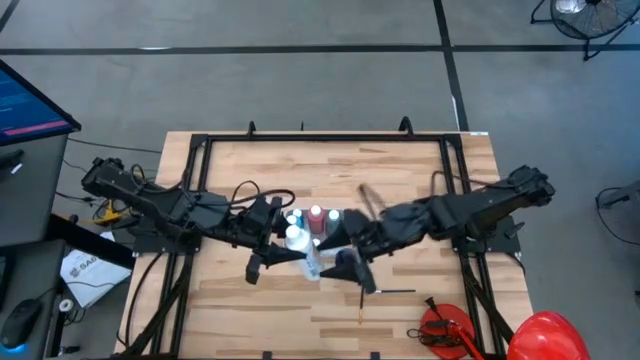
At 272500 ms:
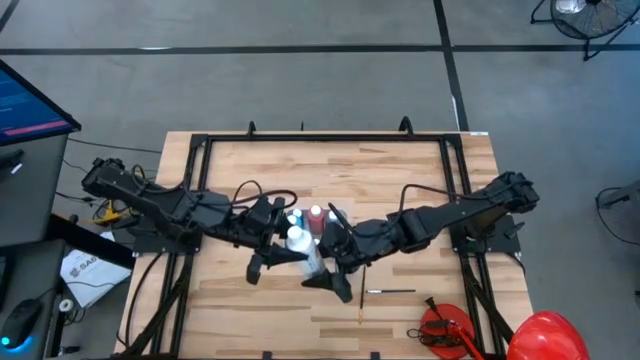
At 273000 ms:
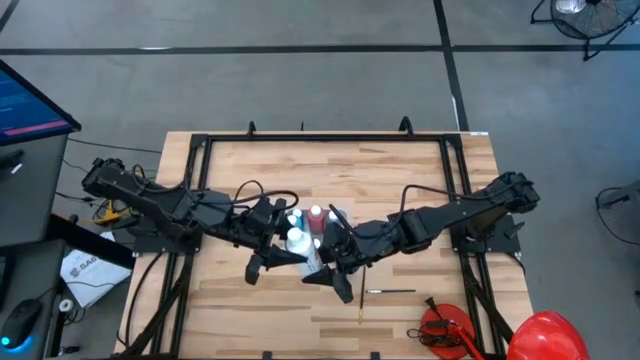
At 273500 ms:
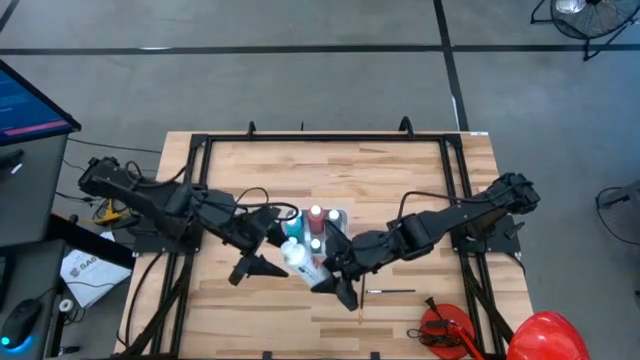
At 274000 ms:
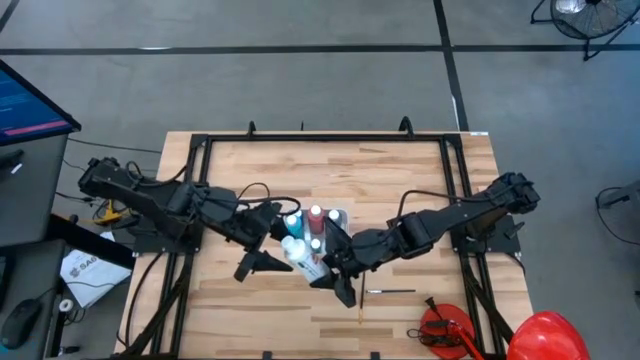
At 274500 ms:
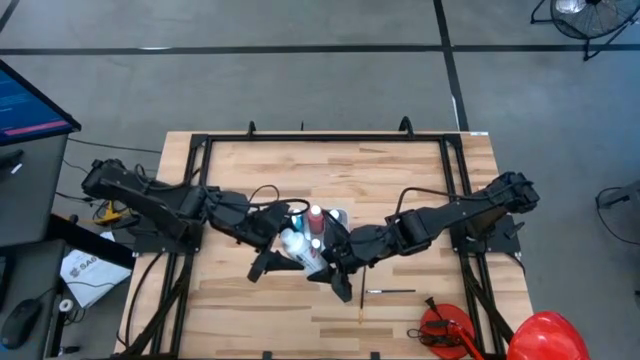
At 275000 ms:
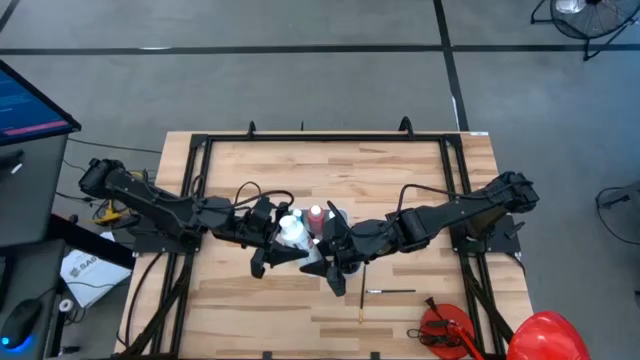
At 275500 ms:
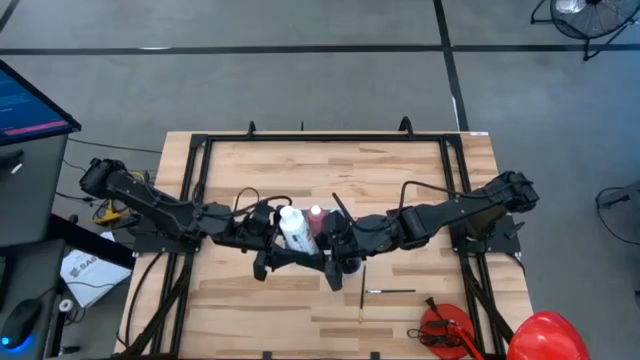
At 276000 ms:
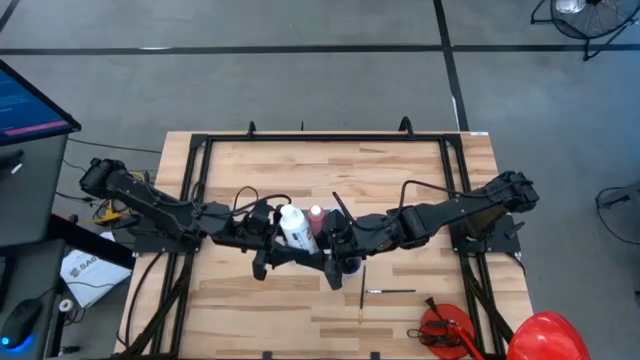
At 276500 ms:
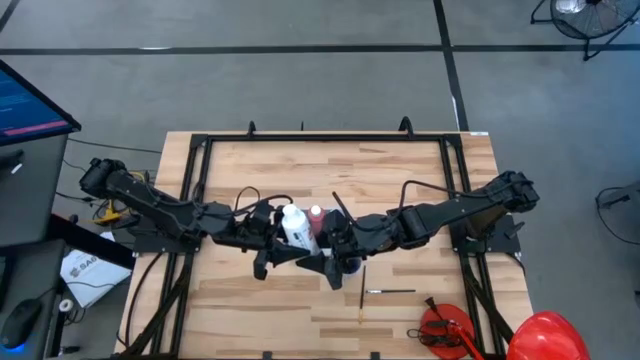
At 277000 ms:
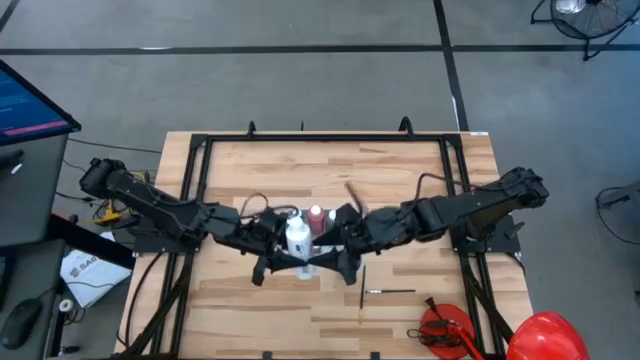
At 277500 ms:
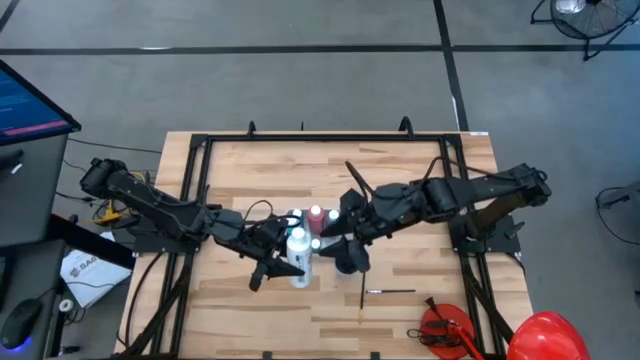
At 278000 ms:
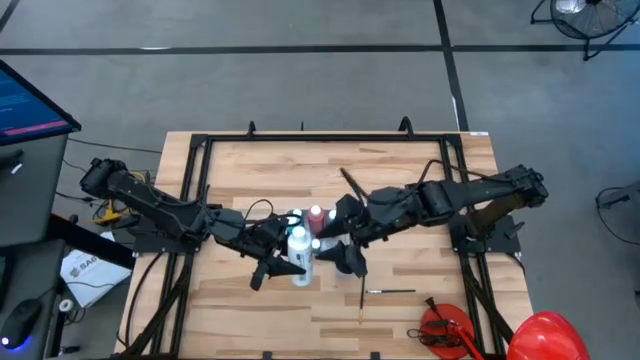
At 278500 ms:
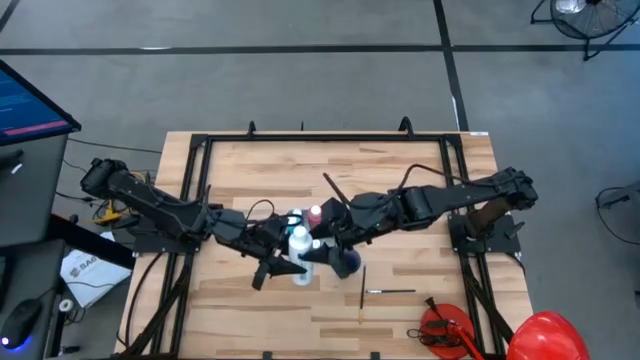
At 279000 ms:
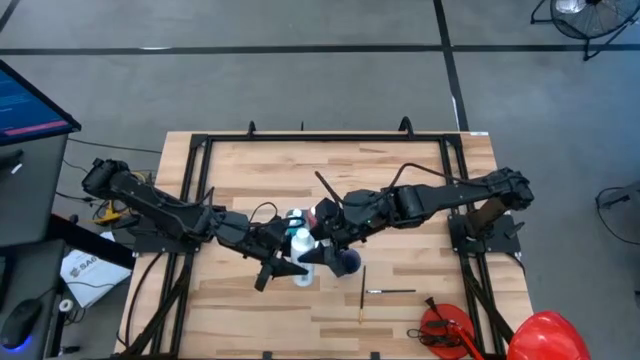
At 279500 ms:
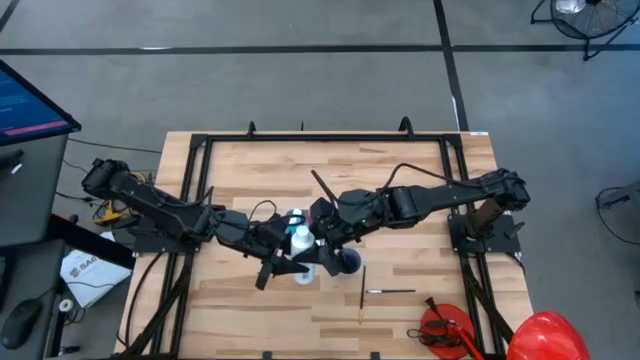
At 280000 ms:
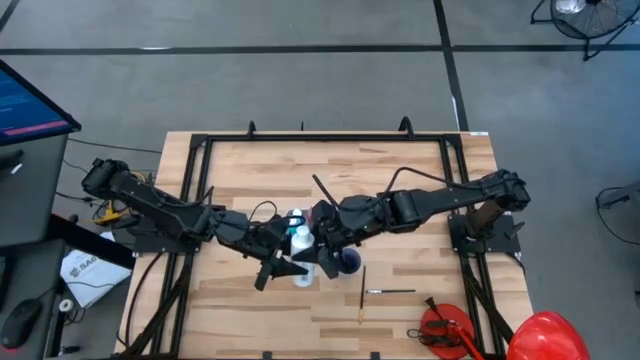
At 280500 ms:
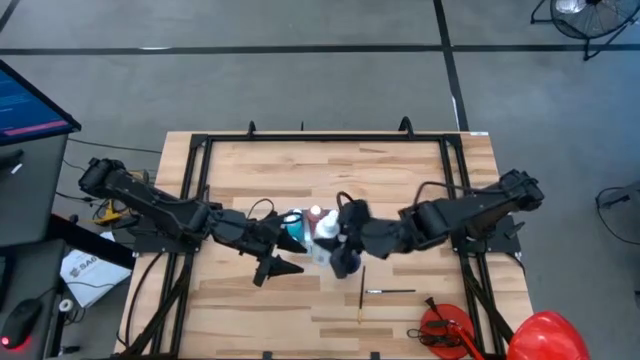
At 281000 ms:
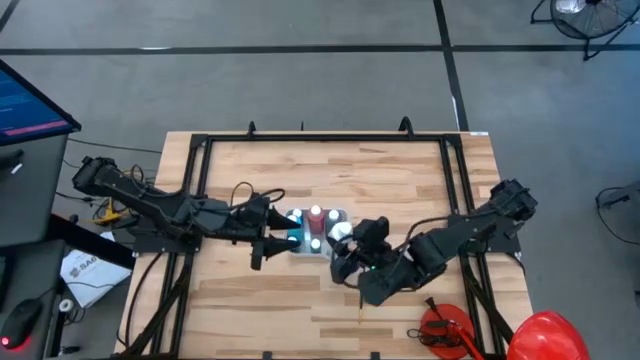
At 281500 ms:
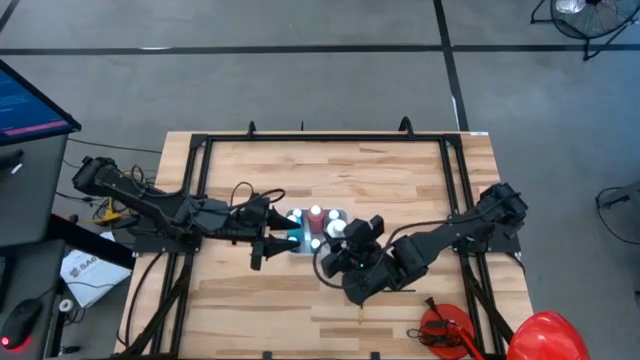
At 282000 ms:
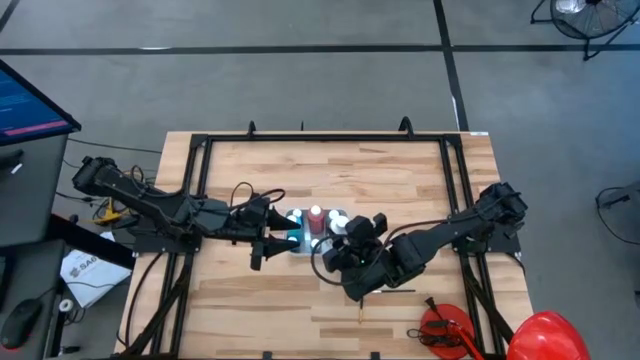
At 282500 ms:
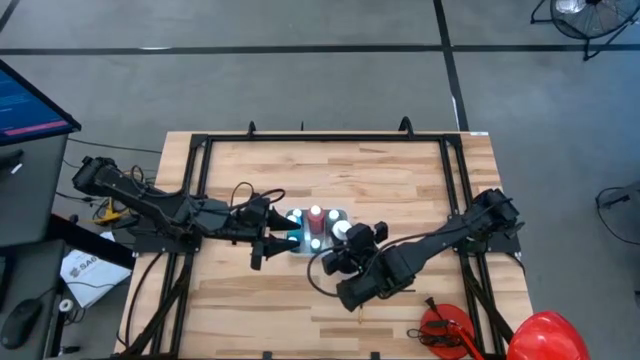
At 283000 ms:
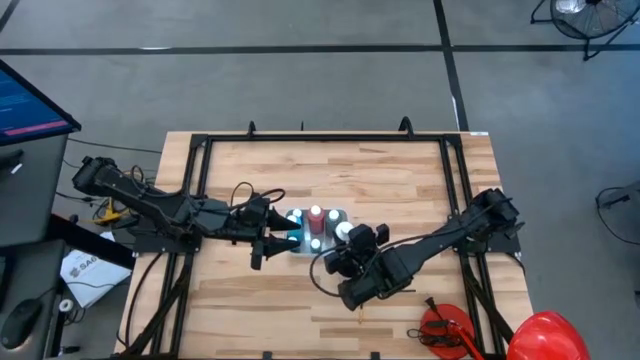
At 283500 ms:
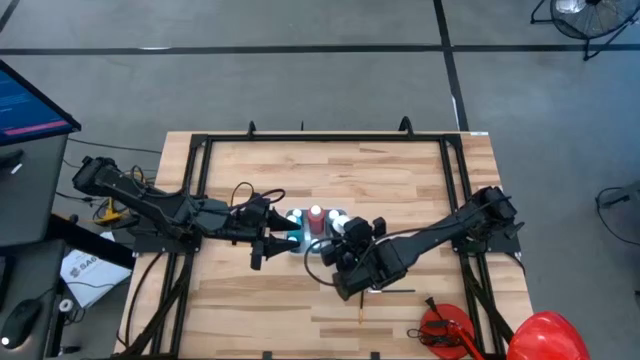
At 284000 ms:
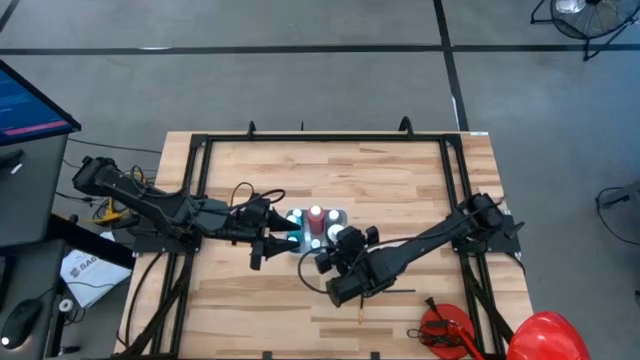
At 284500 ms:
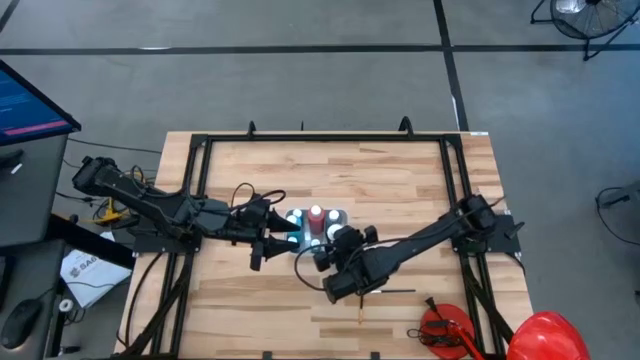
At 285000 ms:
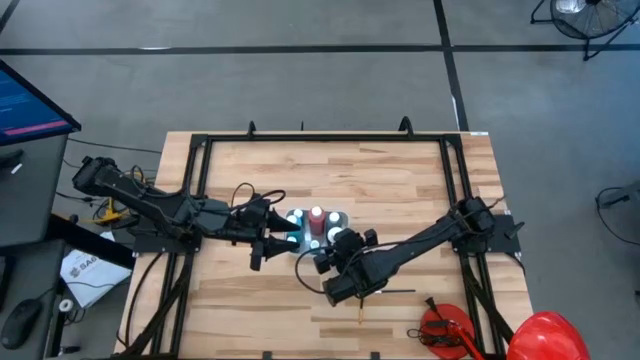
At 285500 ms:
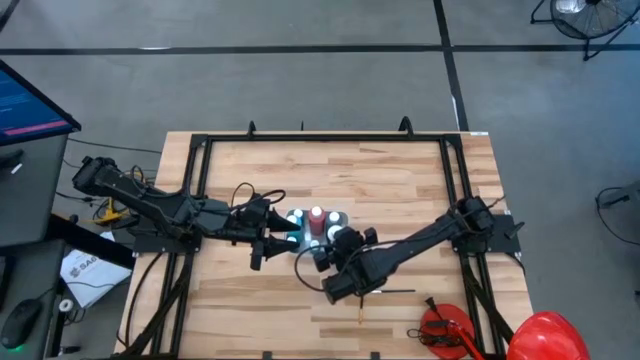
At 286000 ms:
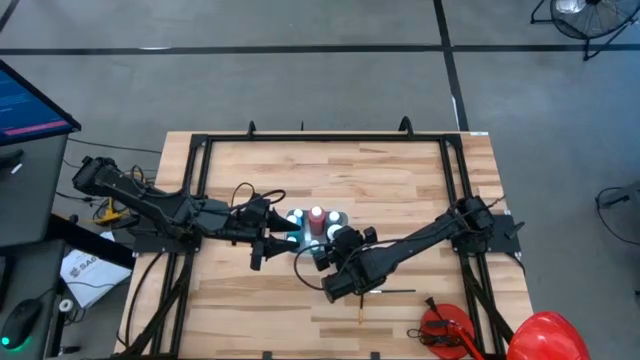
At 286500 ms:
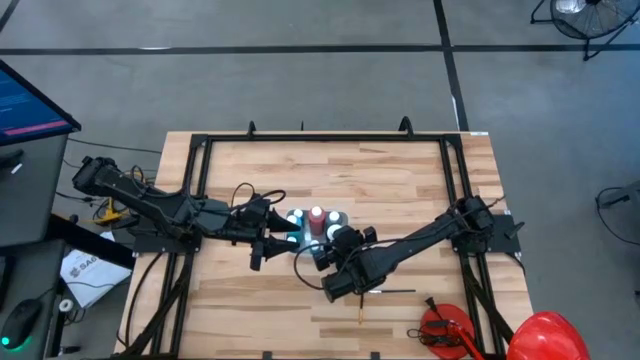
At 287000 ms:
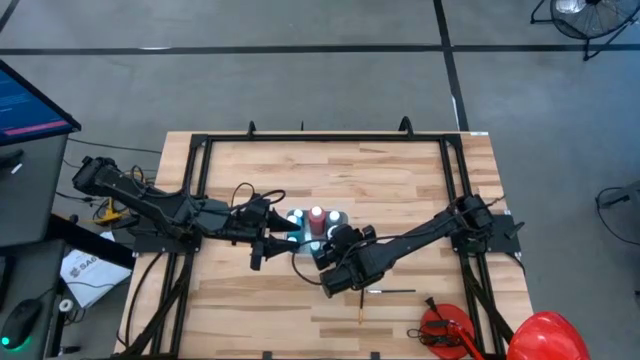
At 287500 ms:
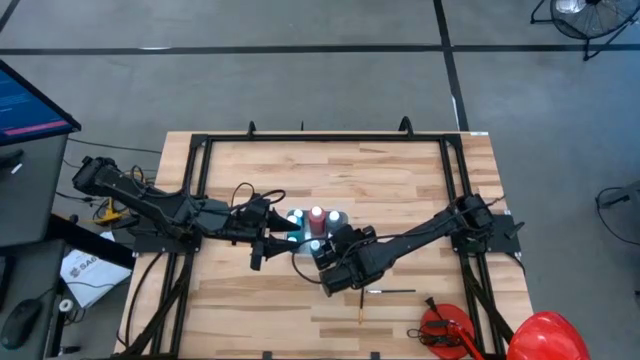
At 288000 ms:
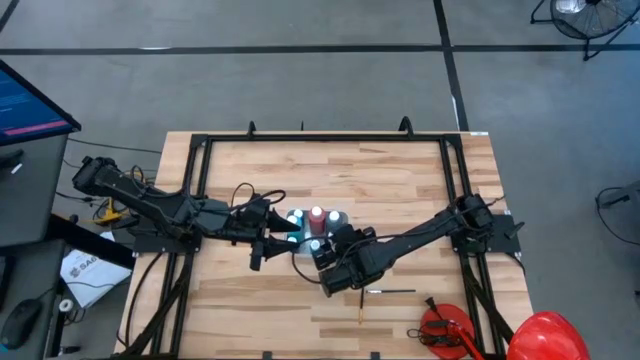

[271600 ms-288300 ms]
Task: Pick & Place Paint Supplies
Put the white paint bottle into the white bin

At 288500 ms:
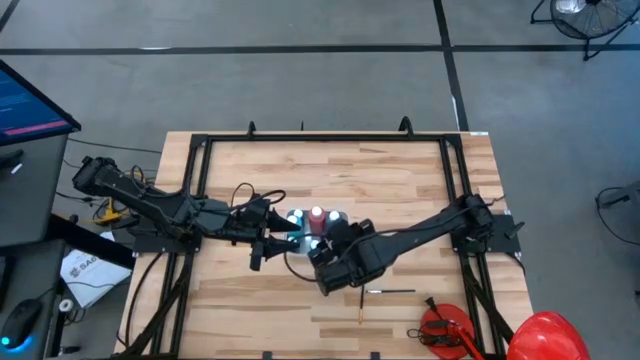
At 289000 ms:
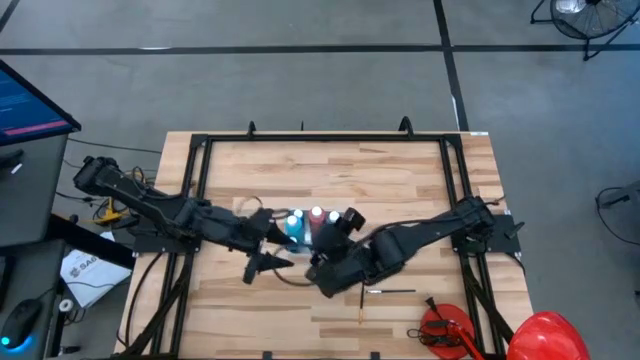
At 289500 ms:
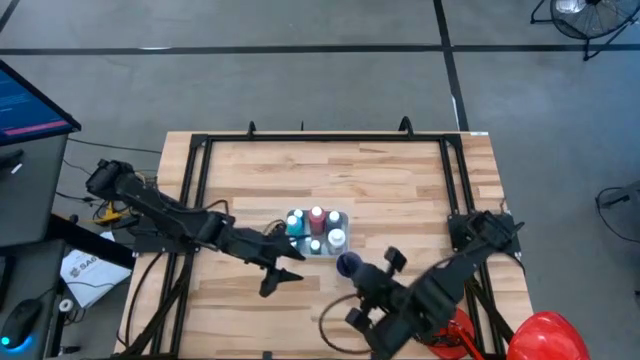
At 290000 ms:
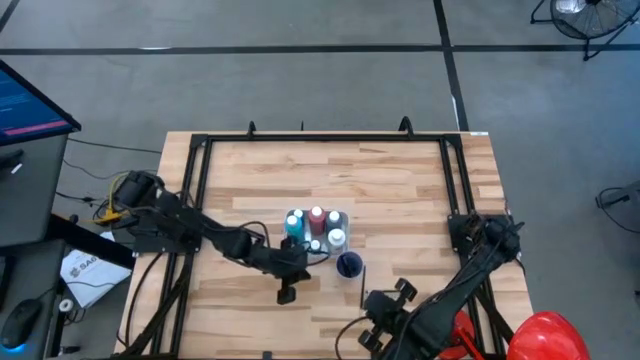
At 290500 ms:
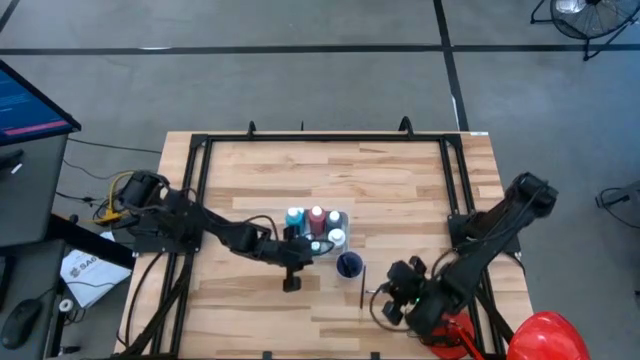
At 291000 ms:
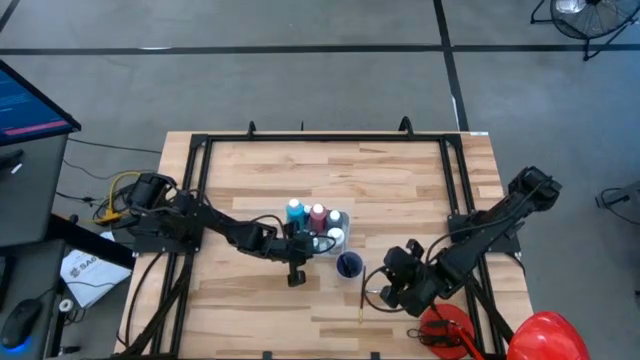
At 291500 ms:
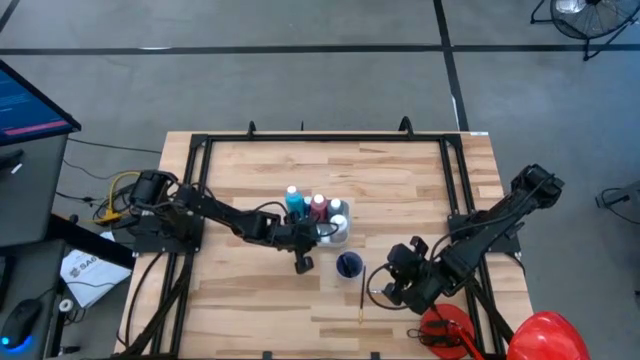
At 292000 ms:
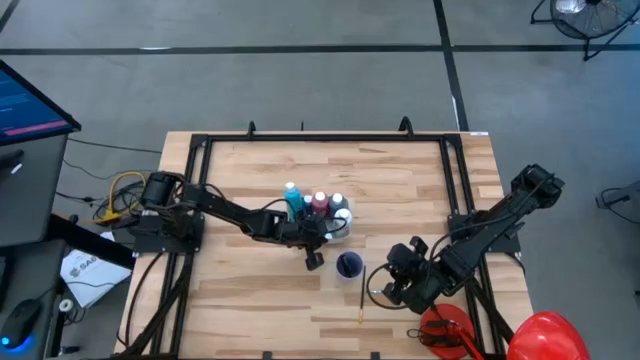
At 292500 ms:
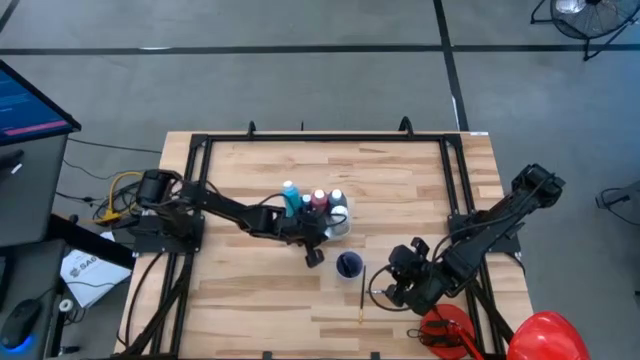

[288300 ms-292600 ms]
Adjust the white bin
